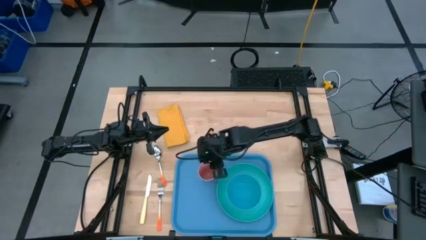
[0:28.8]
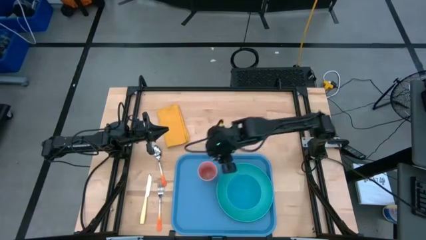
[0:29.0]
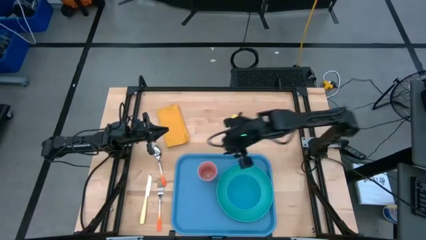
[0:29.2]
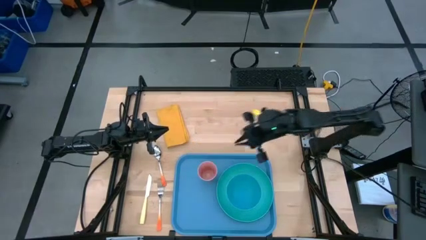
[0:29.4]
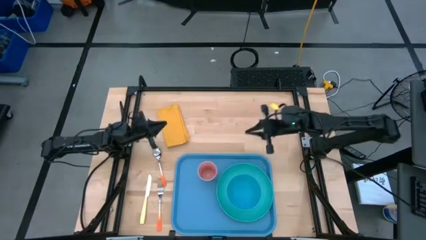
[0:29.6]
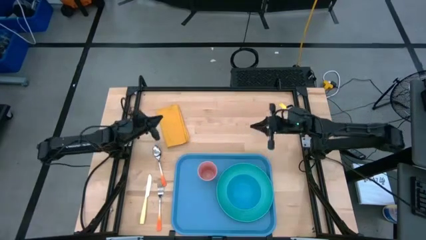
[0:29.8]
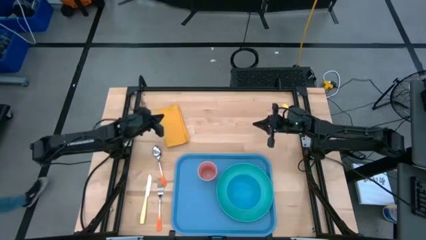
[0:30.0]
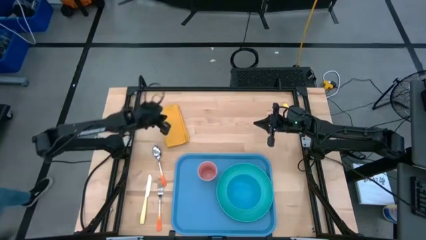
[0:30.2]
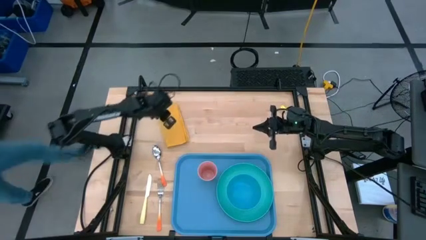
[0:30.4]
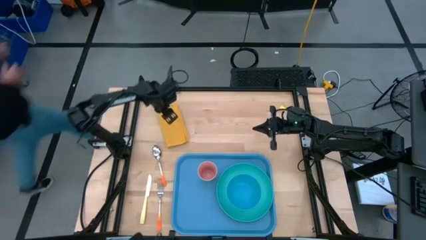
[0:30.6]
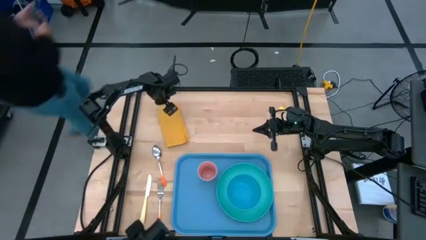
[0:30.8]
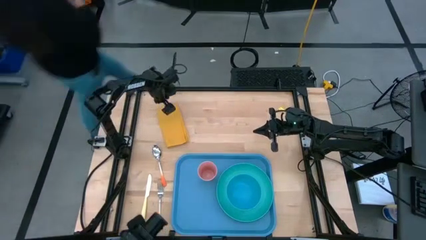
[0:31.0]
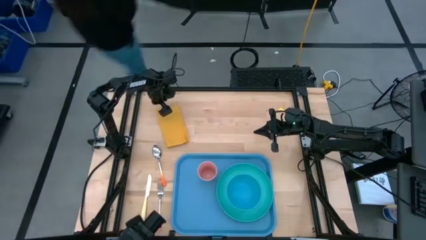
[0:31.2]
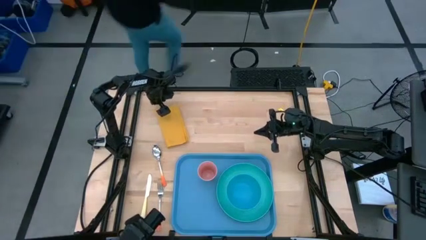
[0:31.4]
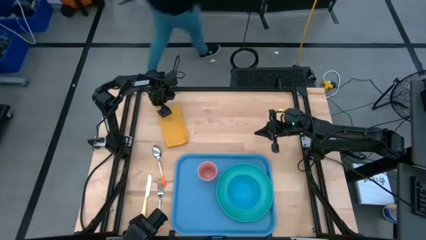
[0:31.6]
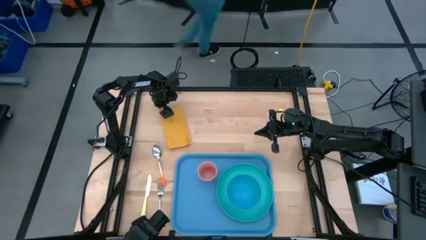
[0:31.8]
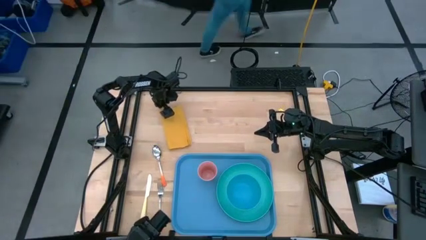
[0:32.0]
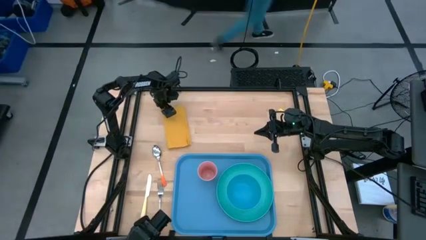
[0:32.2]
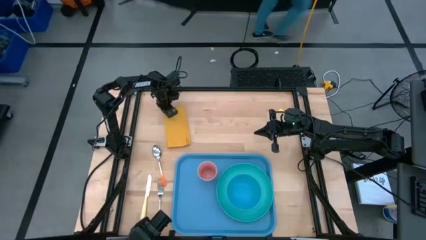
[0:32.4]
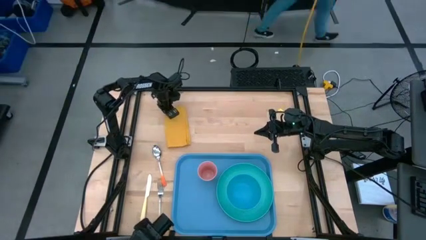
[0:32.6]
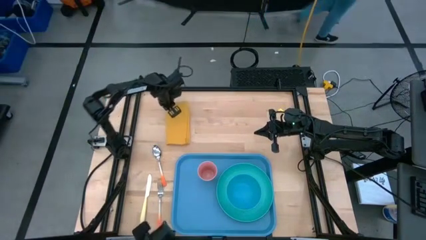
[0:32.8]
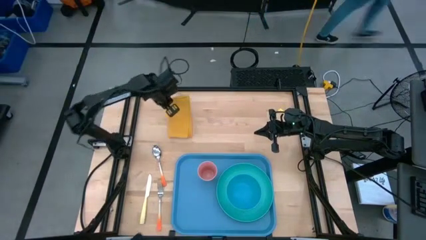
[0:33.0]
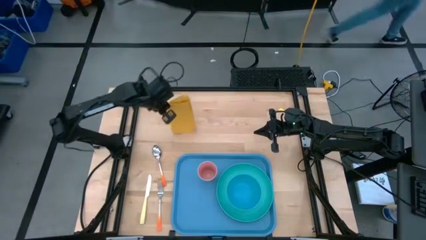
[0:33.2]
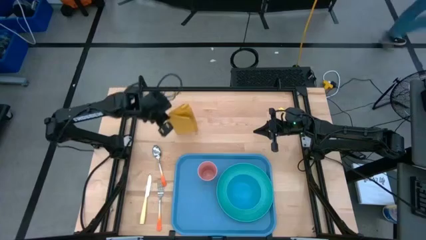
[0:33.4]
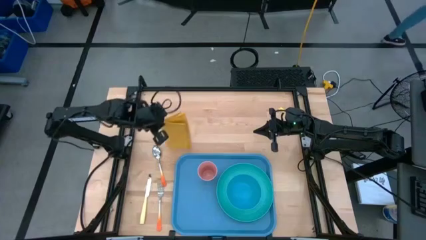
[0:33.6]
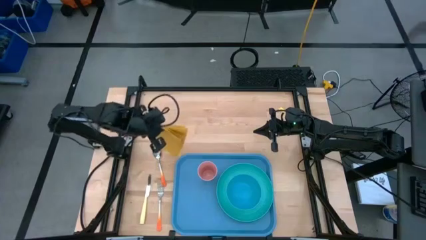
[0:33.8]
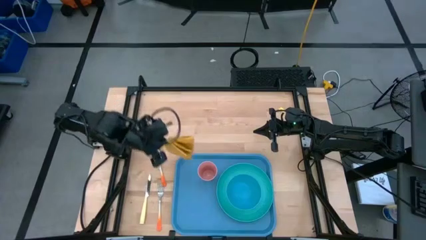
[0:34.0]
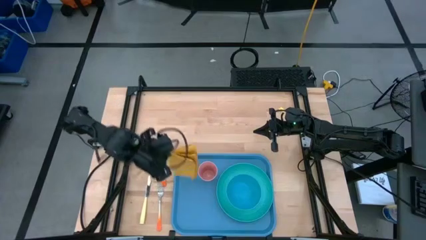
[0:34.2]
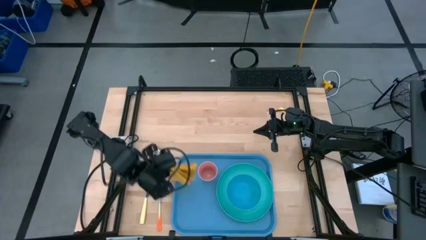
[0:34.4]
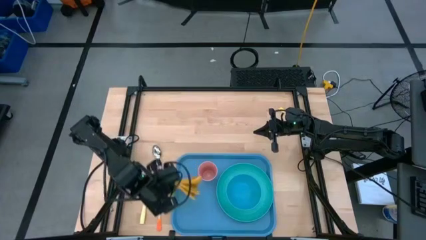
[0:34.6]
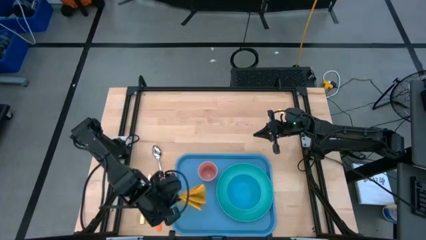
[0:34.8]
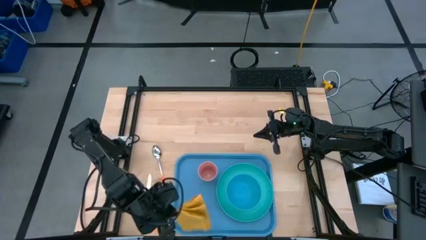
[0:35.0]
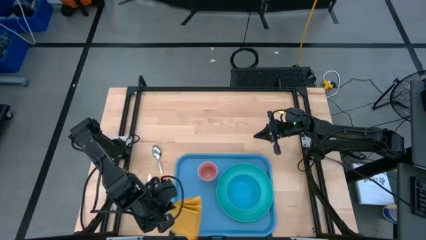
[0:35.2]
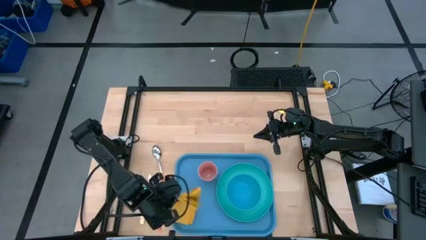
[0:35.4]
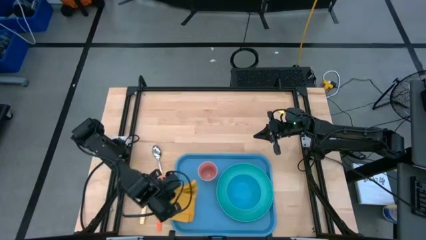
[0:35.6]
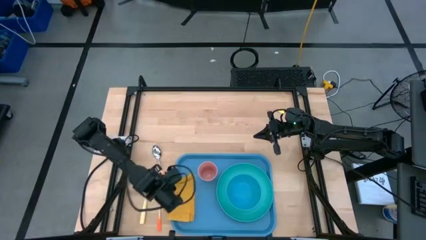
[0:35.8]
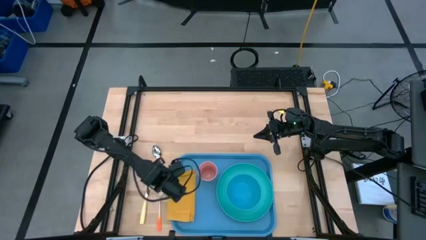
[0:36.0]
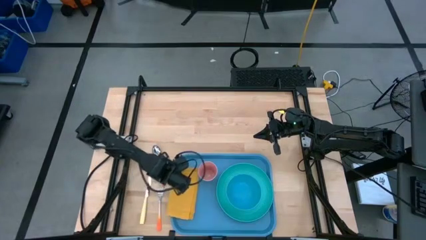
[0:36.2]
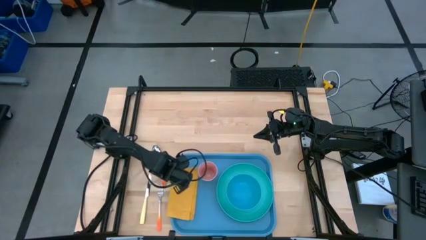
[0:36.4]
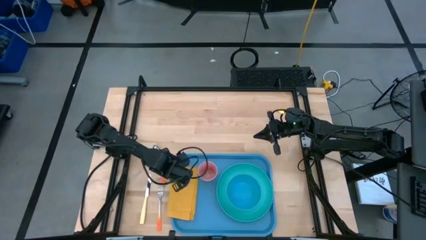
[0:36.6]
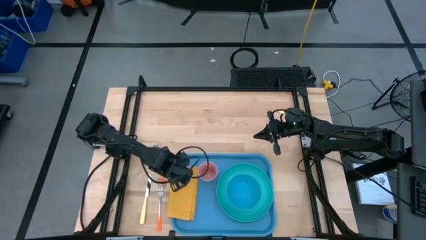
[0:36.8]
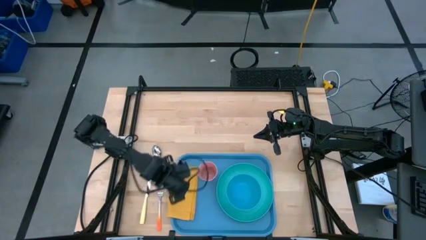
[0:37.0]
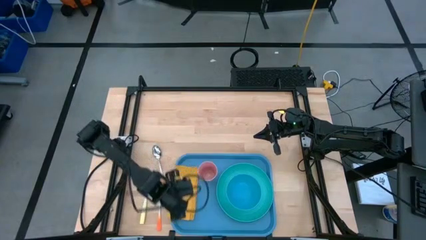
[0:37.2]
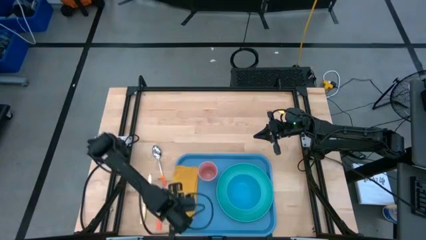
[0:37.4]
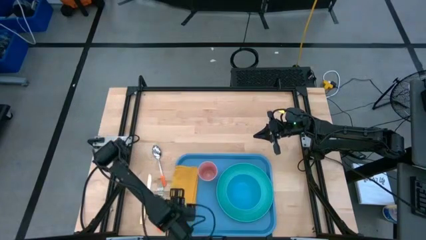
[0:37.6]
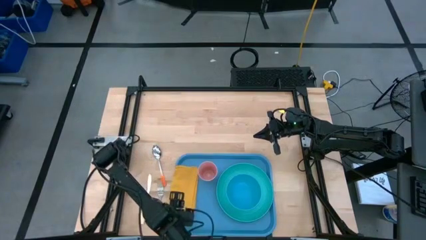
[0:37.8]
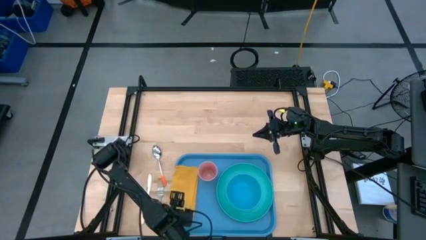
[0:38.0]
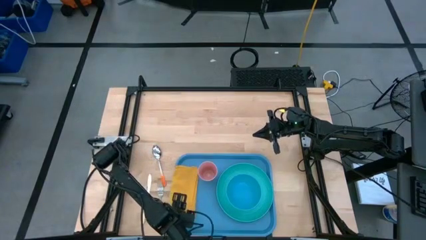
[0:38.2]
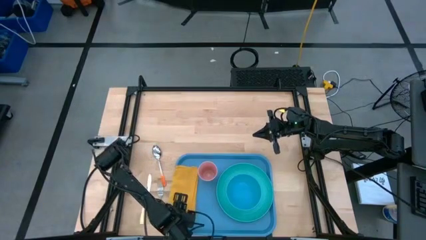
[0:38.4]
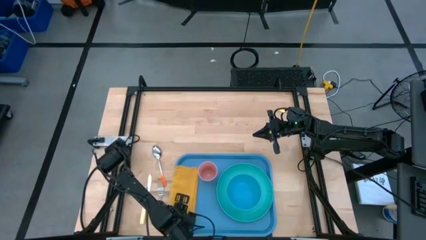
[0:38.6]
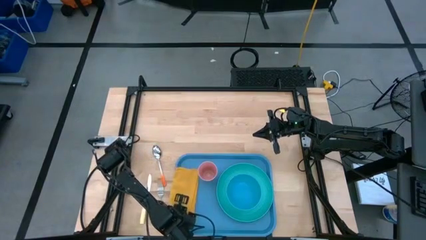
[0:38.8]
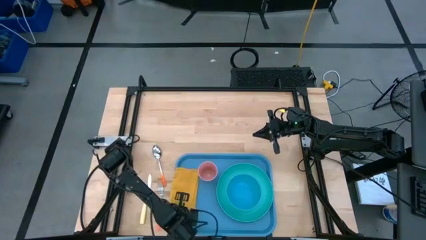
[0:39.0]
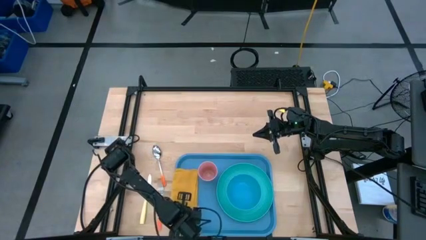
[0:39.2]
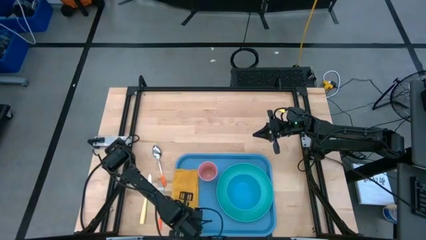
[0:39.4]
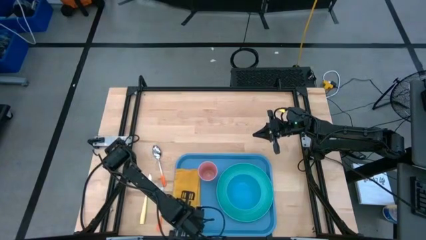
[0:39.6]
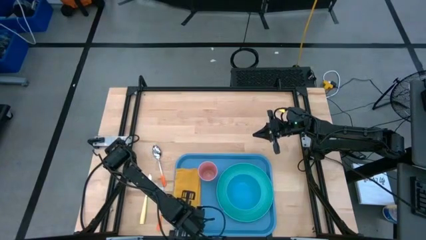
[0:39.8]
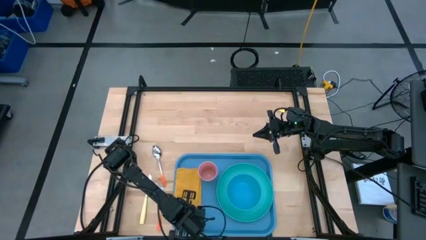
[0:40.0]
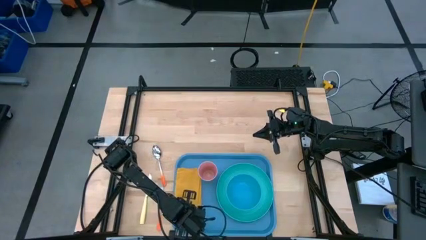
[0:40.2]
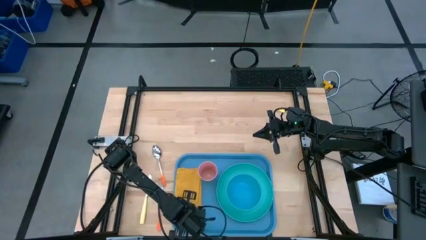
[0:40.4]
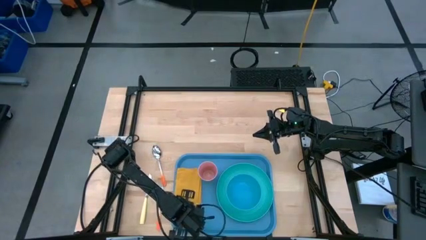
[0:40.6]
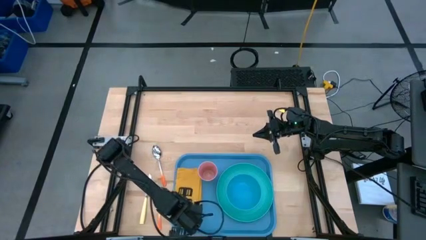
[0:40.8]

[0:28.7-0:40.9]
Task: Set up tray
Put the yellow napkin on the blue serving tray to the left of the blue plate
